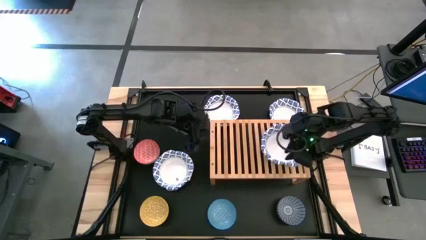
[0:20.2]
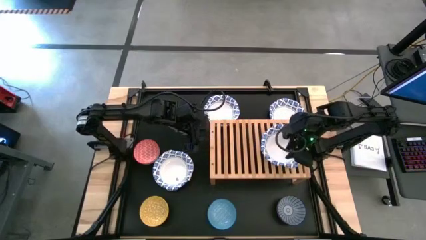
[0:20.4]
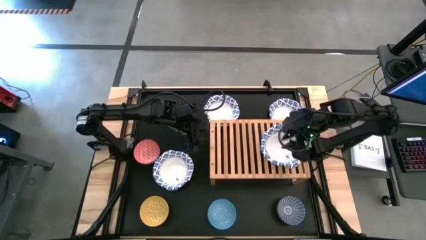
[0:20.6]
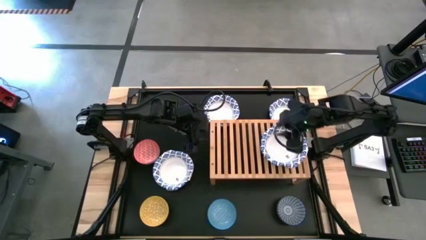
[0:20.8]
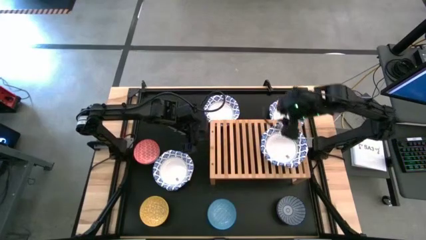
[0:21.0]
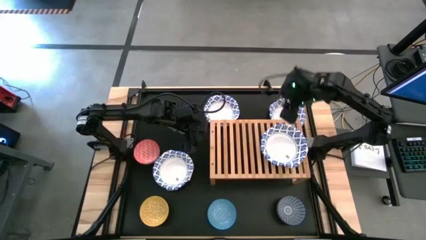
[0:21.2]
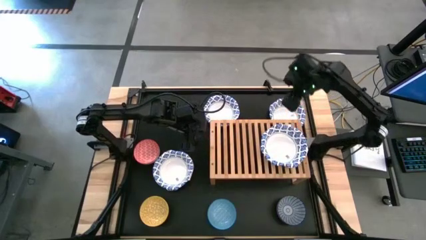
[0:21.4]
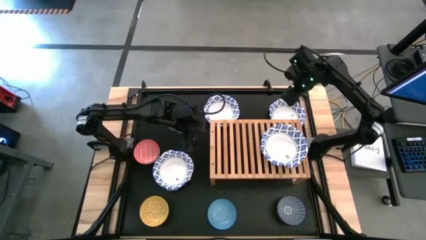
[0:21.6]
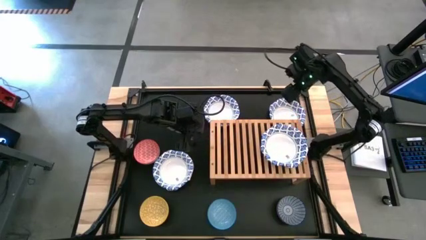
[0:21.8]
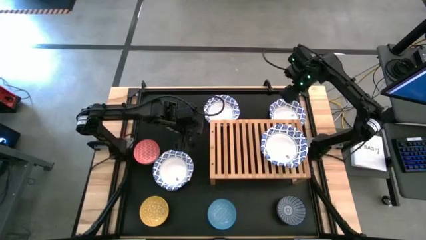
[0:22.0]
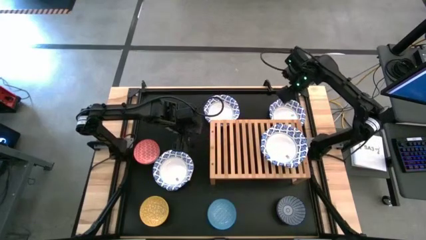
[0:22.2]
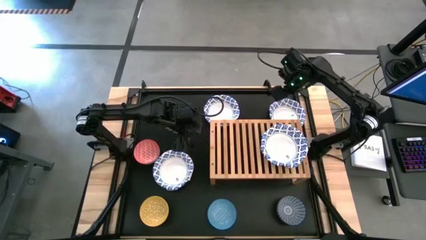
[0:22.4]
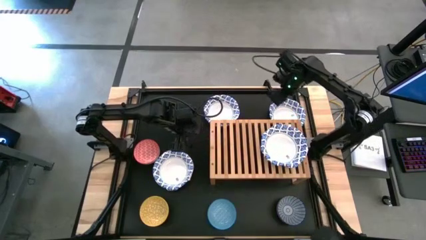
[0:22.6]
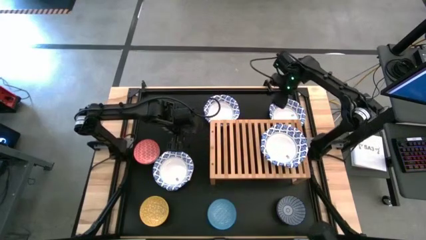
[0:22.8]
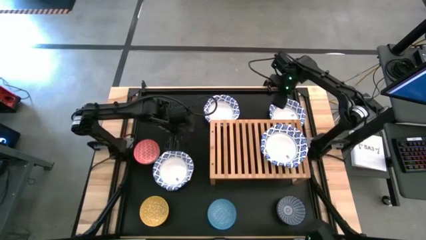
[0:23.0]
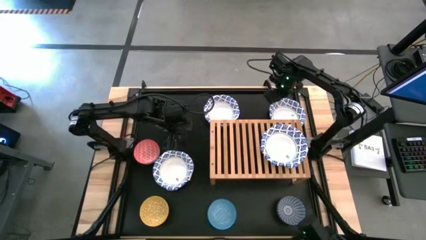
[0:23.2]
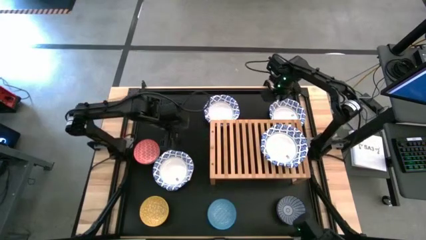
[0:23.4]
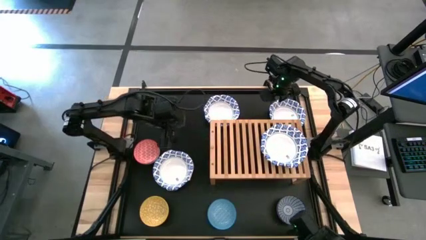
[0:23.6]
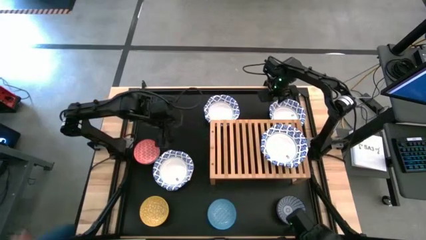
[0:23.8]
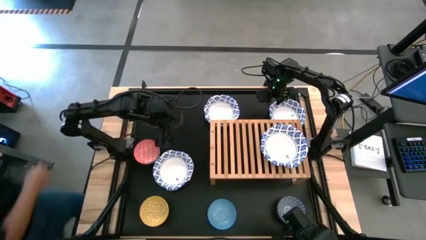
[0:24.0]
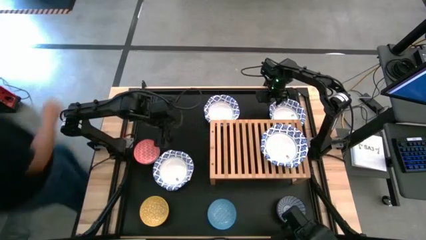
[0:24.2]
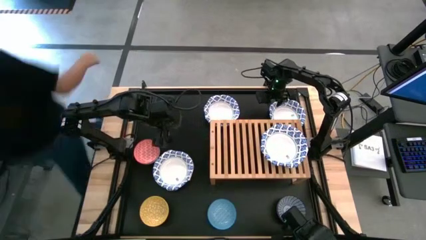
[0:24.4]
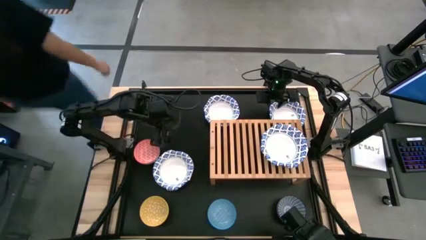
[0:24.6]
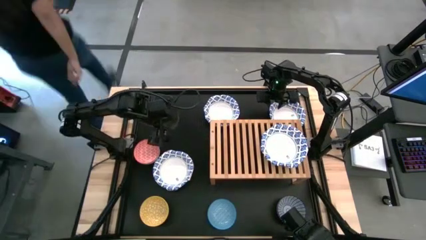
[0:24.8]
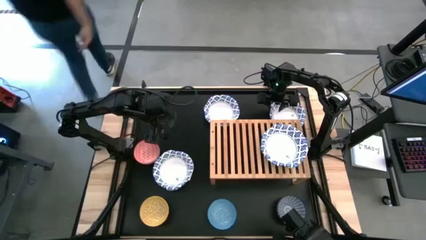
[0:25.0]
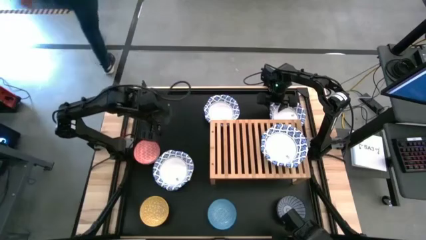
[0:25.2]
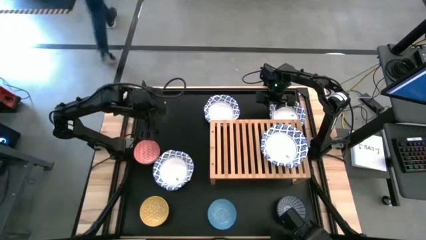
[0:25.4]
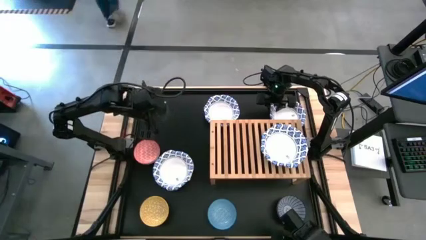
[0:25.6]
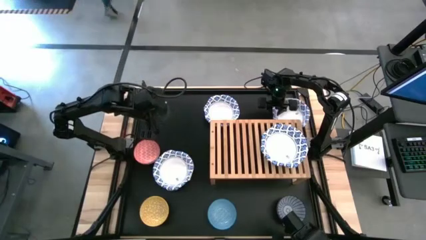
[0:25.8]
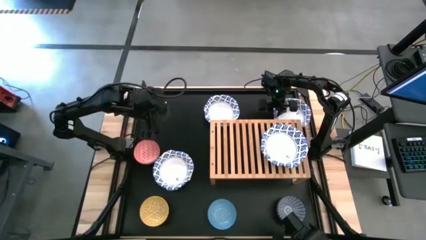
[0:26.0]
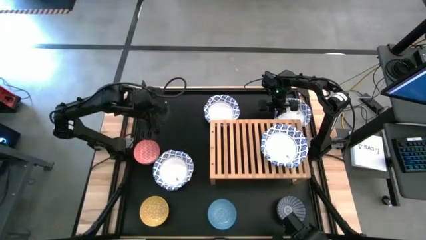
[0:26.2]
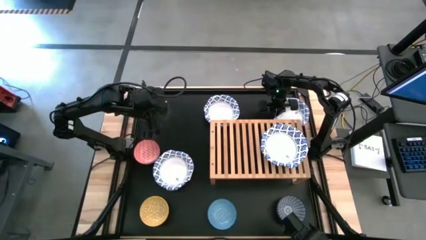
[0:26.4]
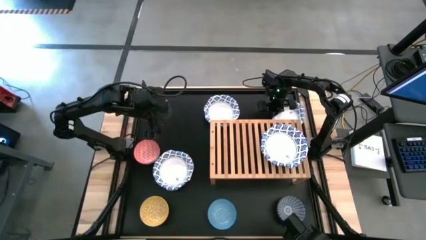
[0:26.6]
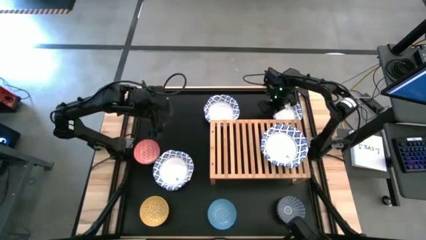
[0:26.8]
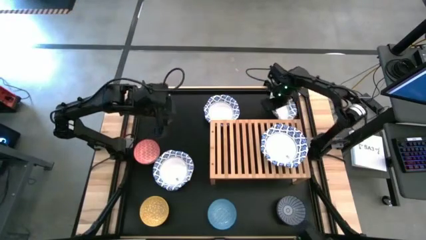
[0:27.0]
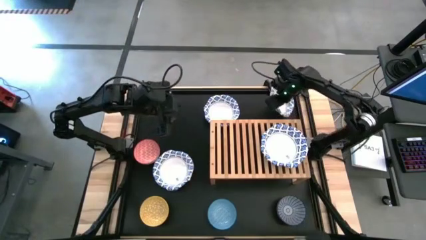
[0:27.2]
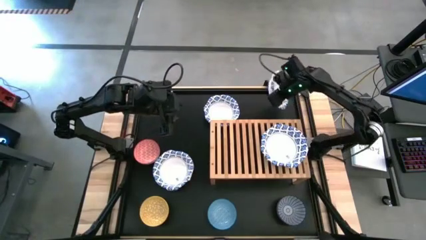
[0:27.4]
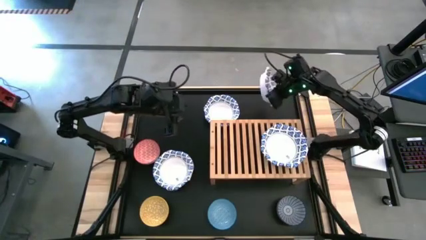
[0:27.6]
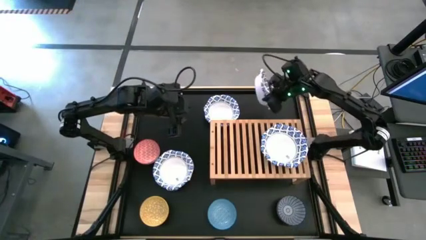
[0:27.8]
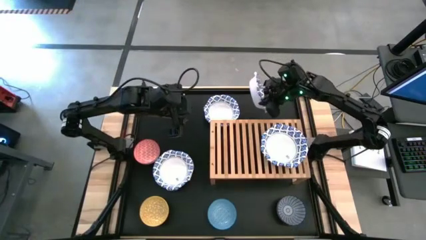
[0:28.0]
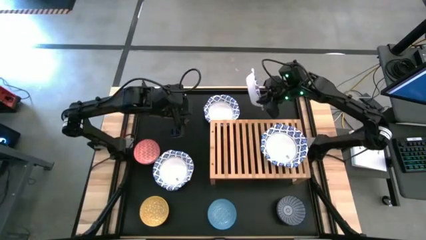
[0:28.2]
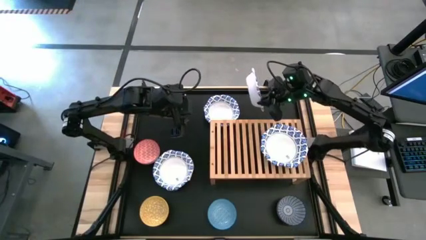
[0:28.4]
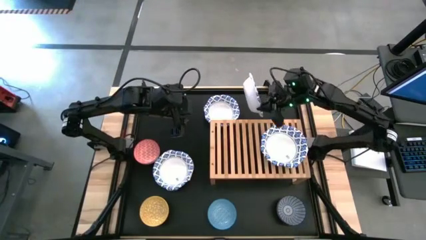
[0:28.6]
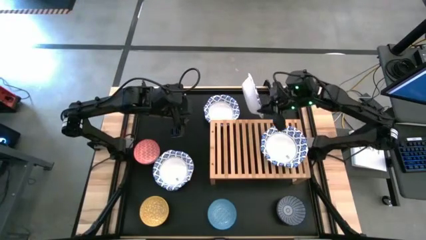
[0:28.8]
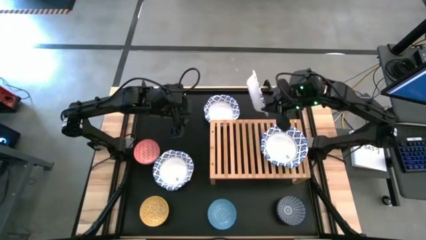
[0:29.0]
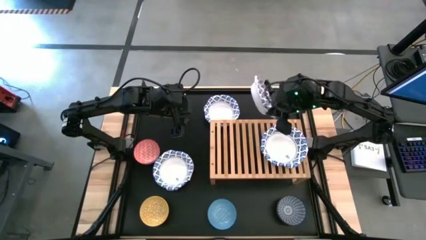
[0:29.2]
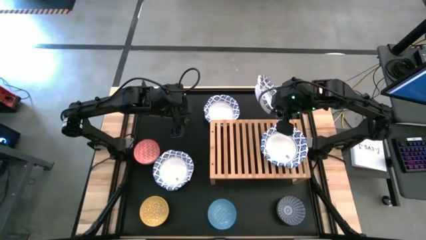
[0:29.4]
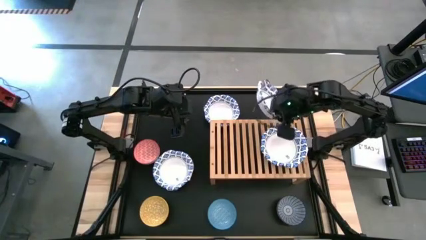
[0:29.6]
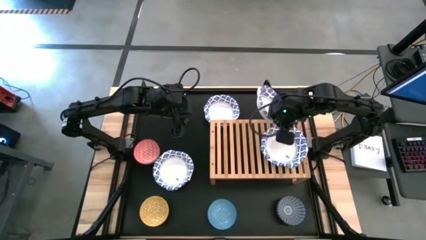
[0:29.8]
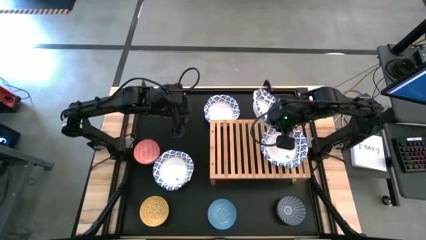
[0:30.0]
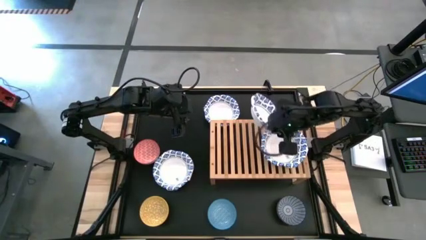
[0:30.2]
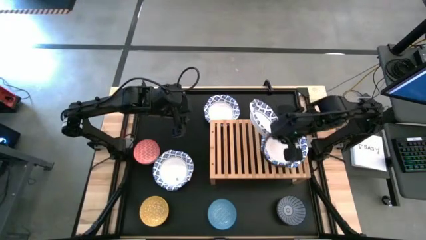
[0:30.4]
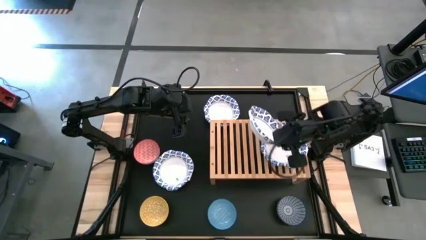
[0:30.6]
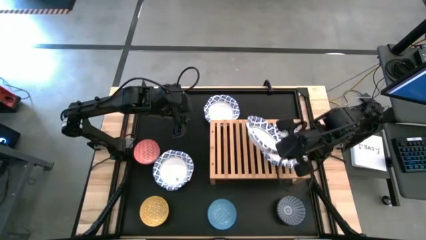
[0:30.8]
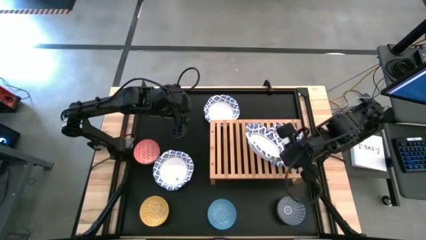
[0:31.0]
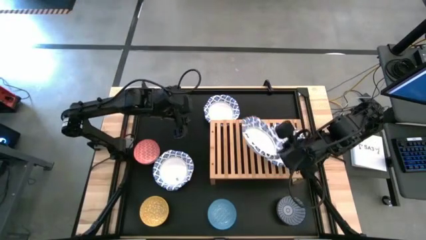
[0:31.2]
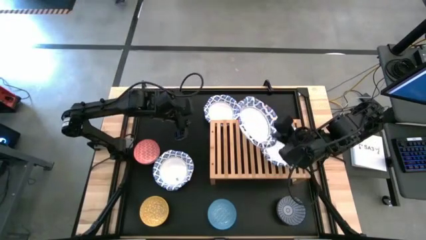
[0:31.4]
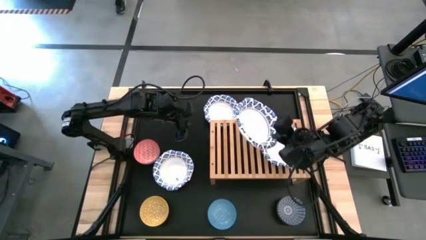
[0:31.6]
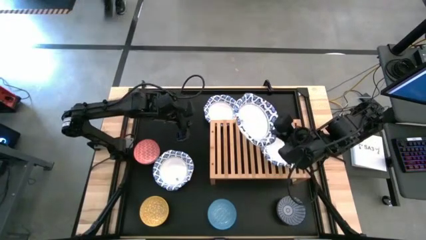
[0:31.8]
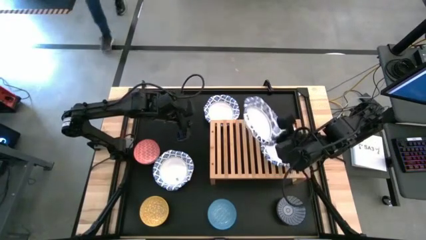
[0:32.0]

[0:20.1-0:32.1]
Task: Place and stack bowls onto a shelf
Stack the top right big white and blue bowl on top of the big white and blue bowl

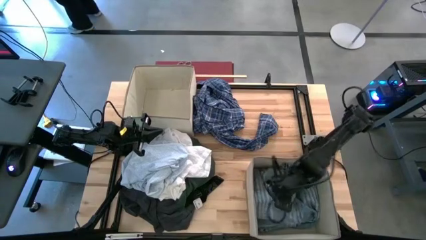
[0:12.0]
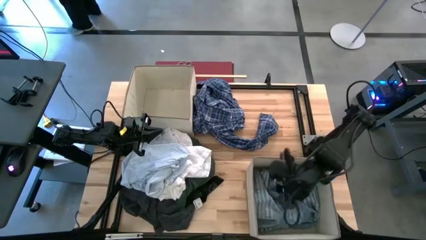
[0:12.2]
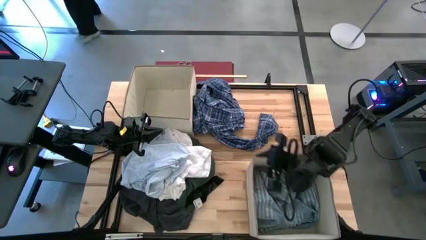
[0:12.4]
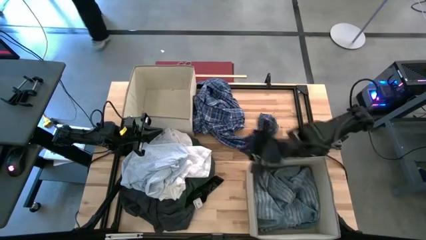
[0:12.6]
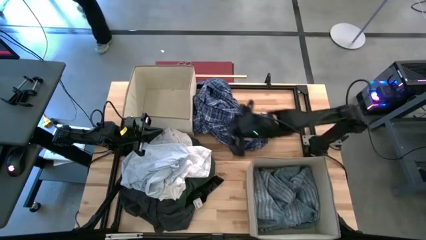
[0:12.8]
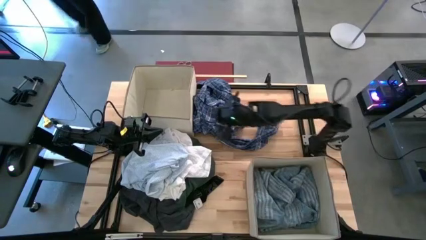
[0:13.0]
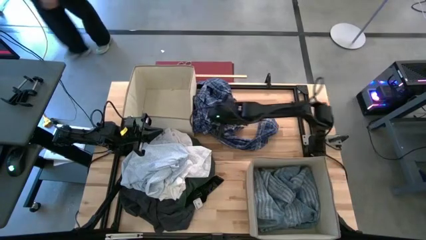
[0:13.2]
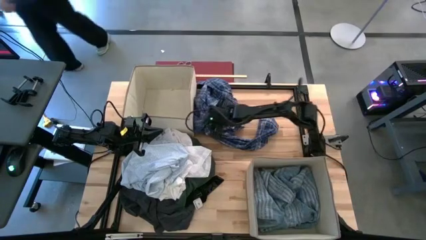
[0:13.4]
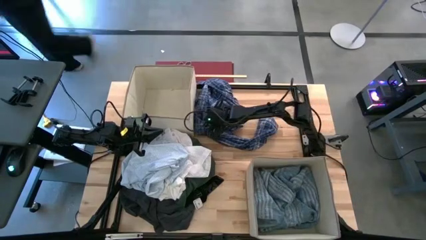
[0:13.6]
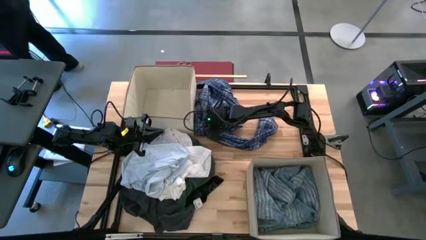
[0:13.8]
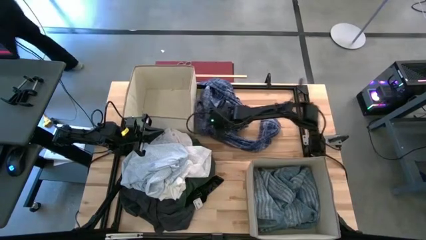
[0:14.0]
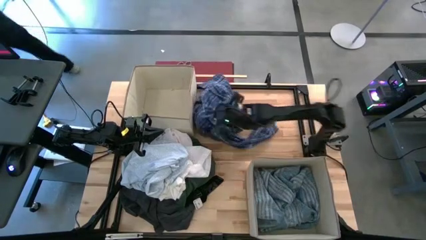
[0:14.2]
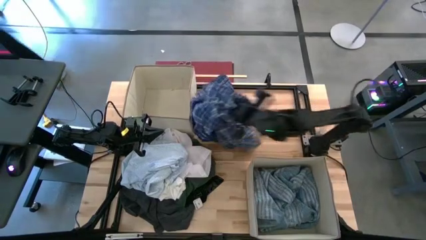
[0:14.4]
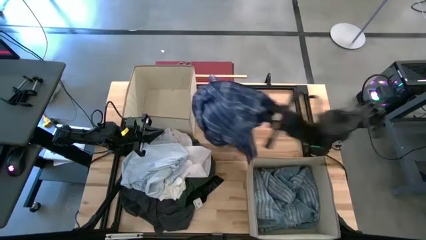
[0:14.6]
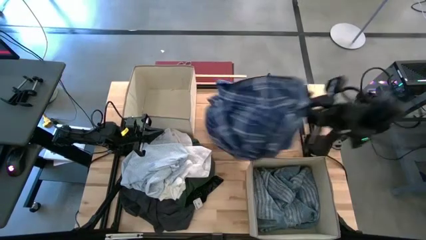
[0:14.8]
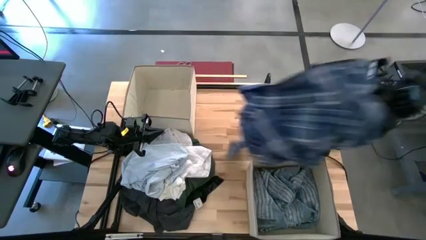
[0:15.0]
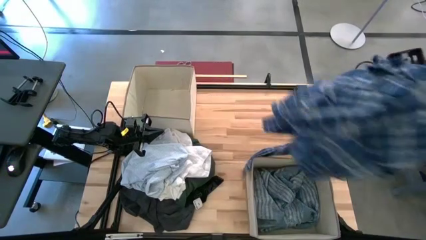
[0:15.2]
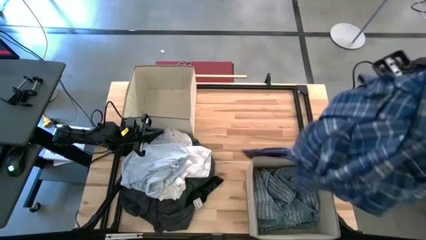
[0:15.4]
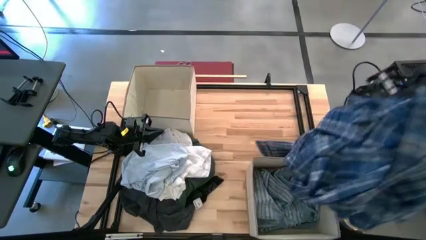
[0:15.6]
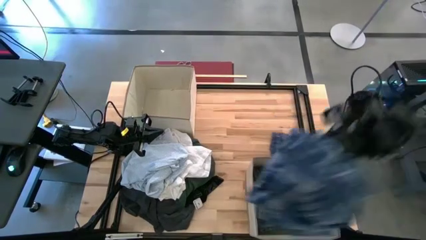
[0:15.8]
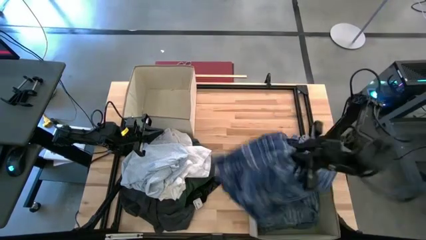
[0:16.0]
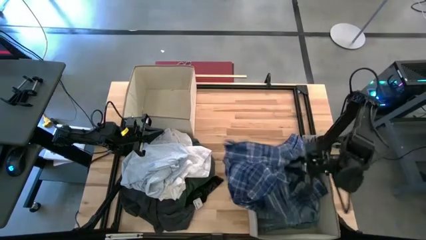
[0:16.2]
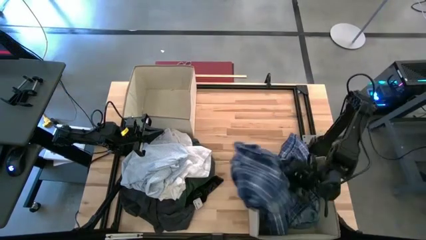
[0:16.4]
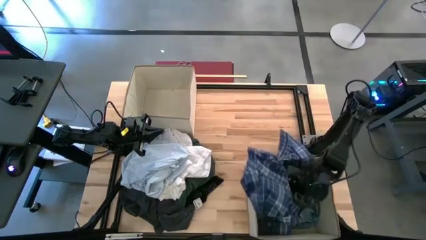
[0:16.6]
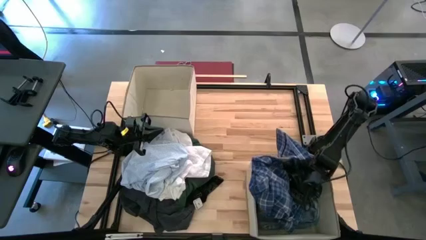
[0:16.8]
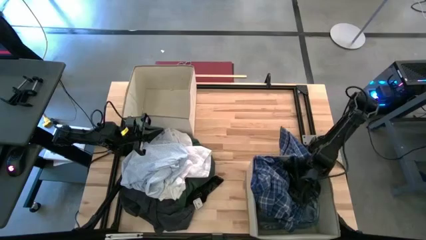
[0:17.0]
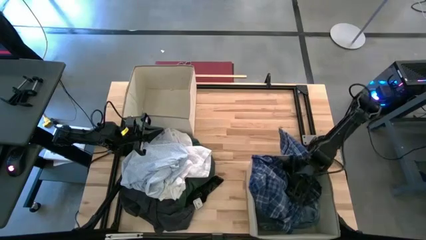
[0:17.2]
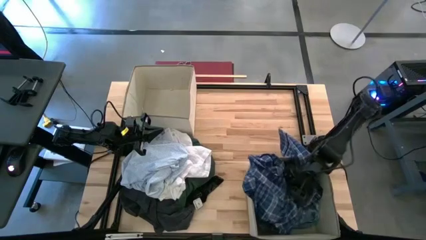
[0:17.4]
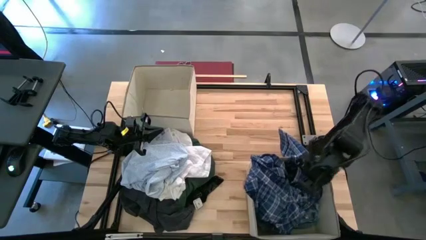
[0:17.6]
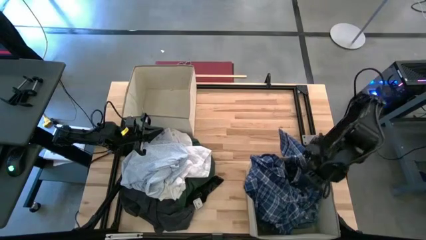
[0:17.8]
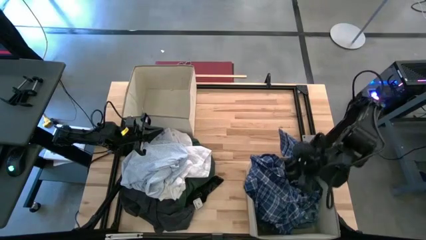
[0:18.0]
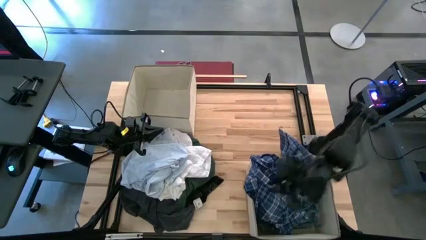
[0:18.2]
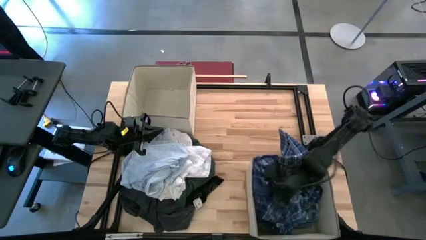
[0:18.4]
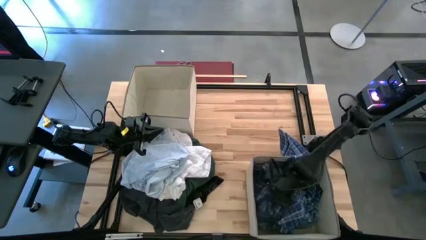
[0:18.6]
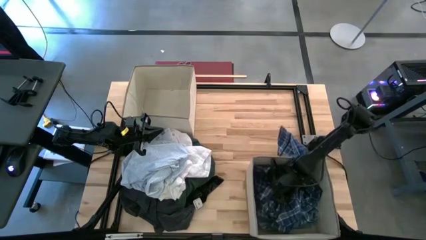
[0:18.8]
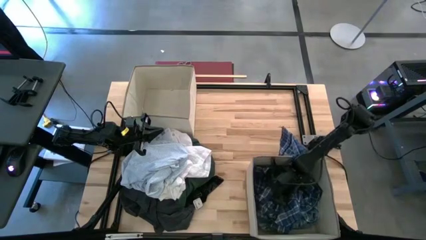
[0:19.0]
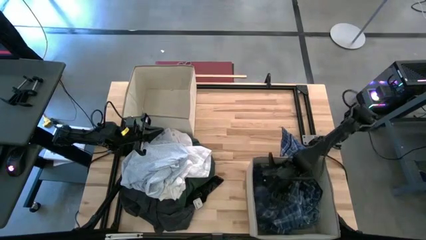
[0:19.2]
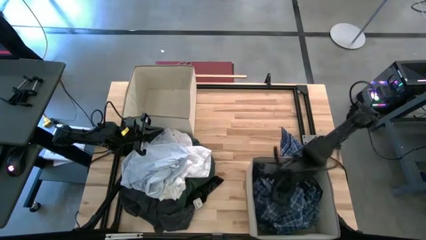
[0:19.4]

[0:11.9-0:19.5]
Task: Sort clothes
Put the blue polo shirt into the bottom laundry bin
